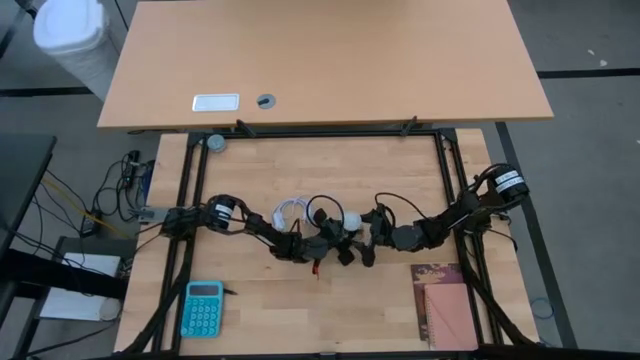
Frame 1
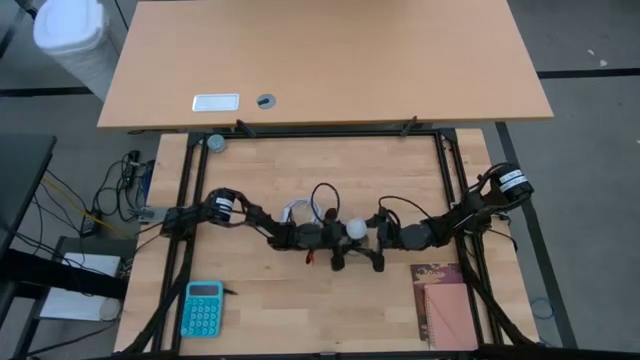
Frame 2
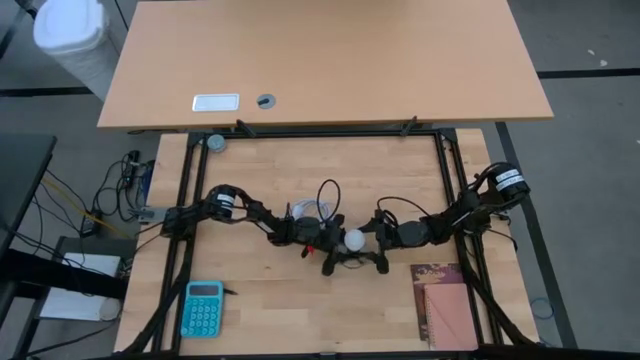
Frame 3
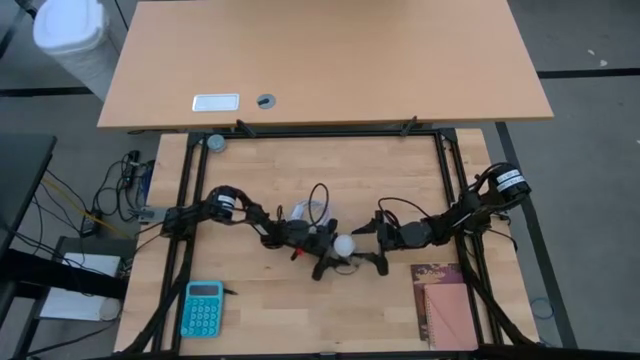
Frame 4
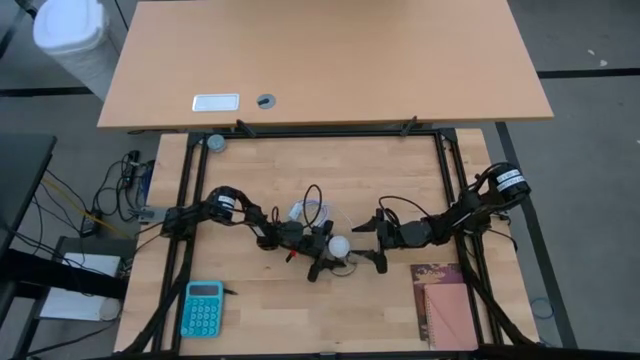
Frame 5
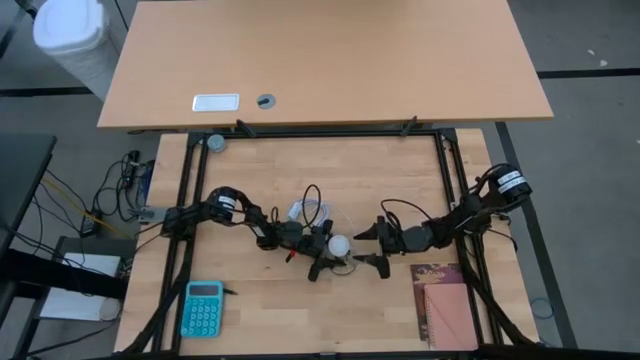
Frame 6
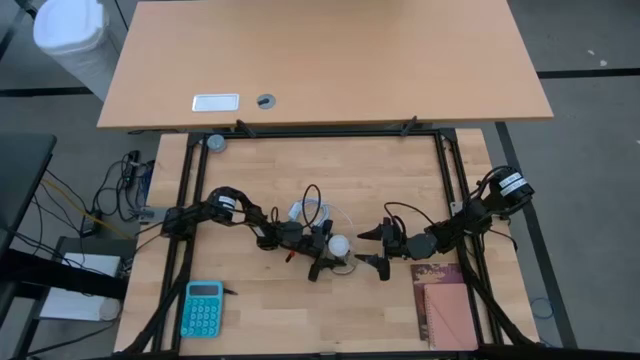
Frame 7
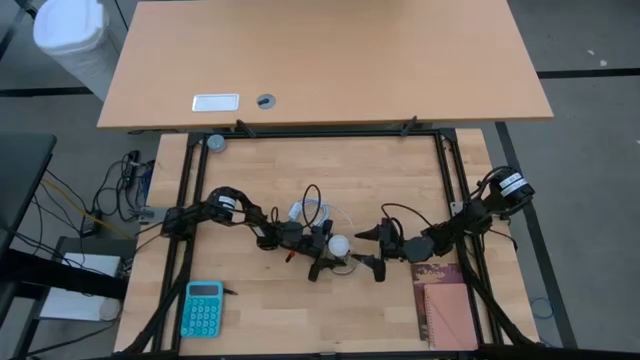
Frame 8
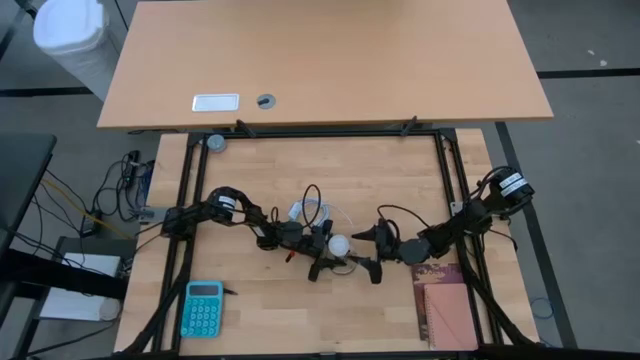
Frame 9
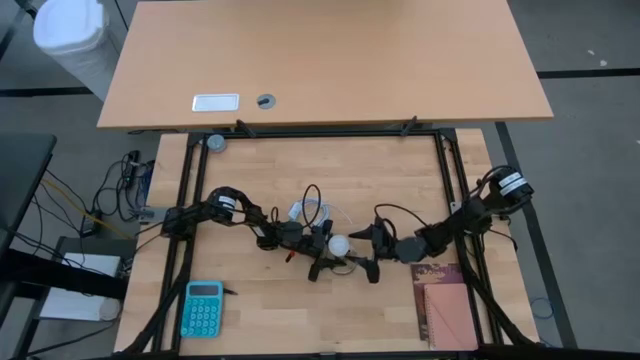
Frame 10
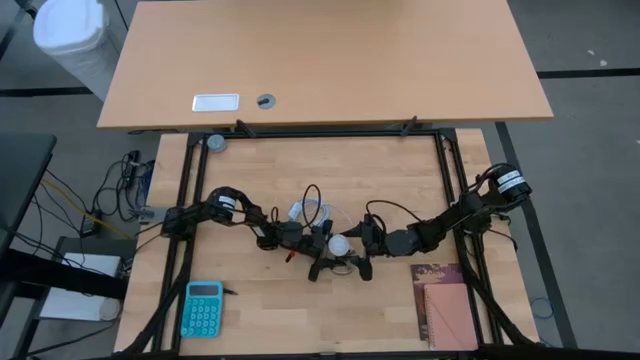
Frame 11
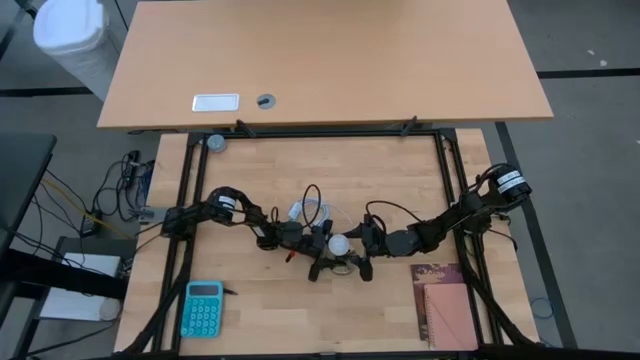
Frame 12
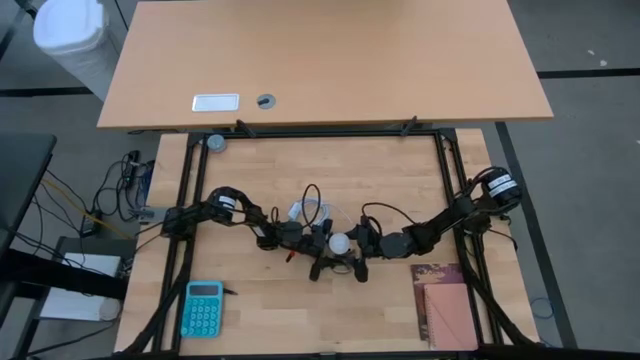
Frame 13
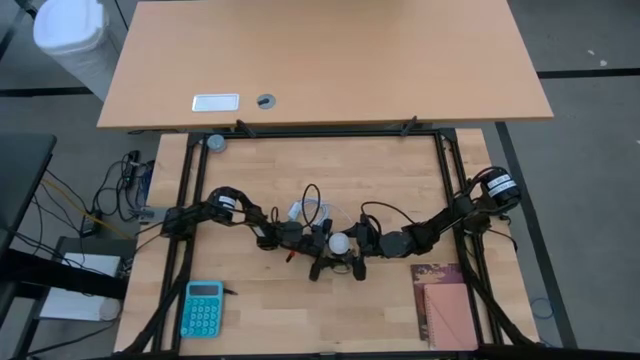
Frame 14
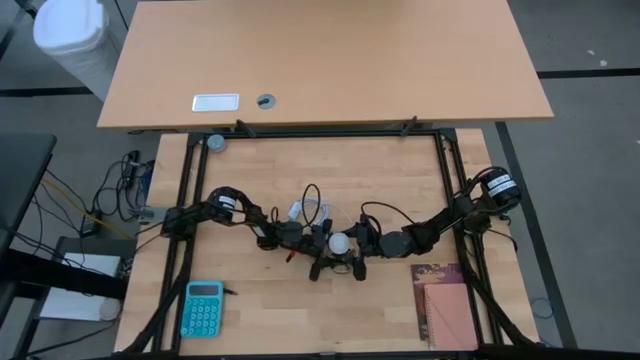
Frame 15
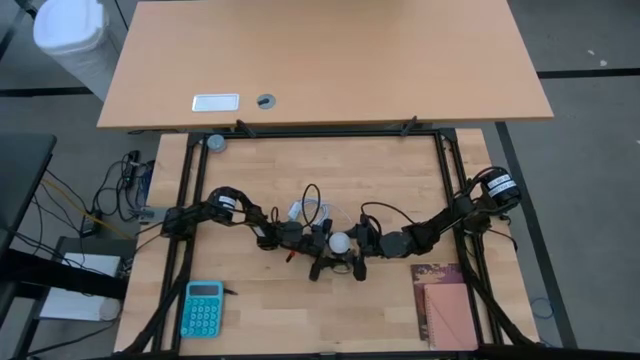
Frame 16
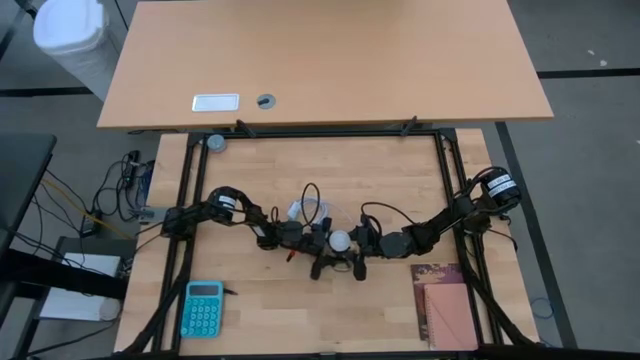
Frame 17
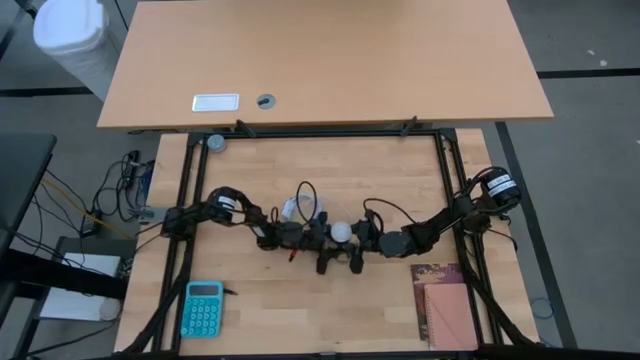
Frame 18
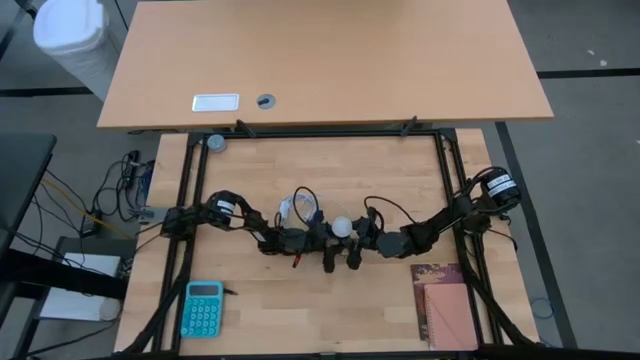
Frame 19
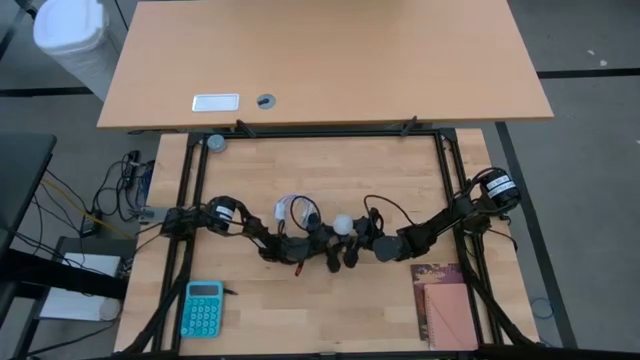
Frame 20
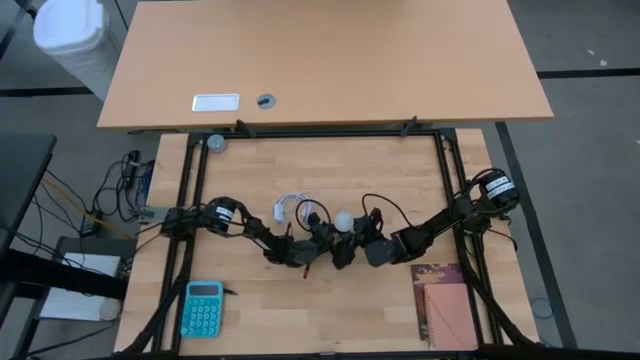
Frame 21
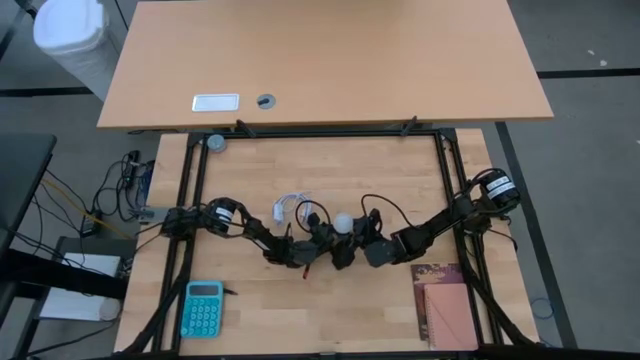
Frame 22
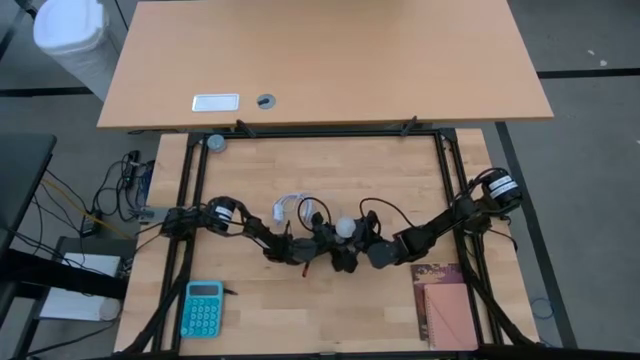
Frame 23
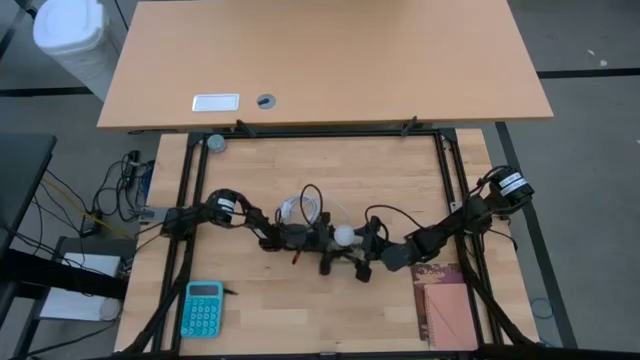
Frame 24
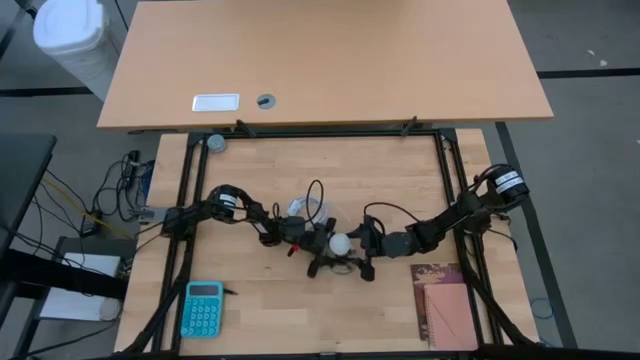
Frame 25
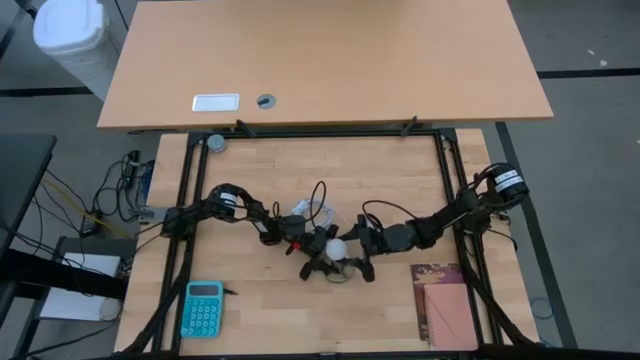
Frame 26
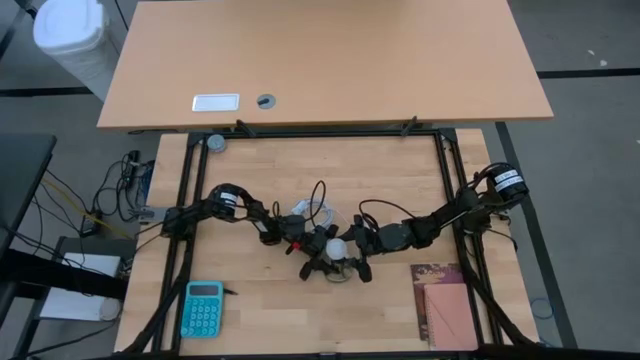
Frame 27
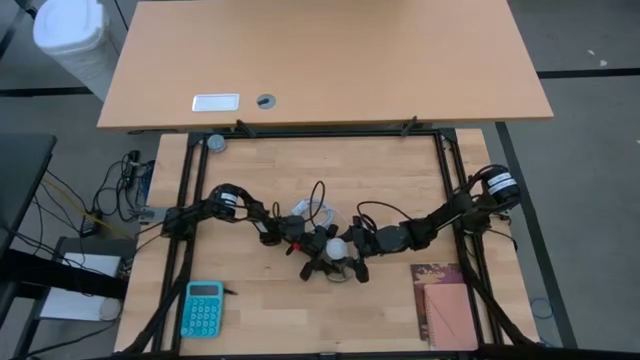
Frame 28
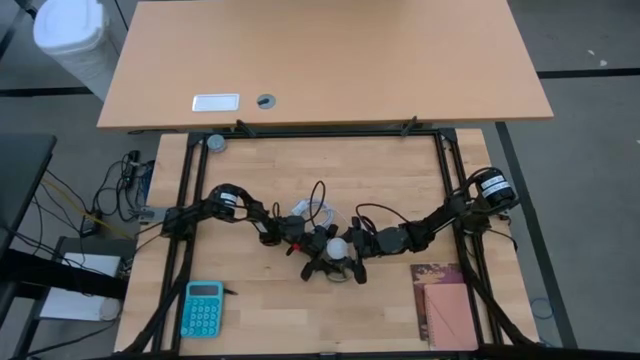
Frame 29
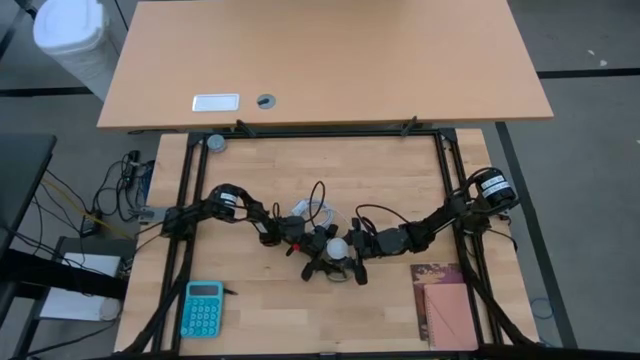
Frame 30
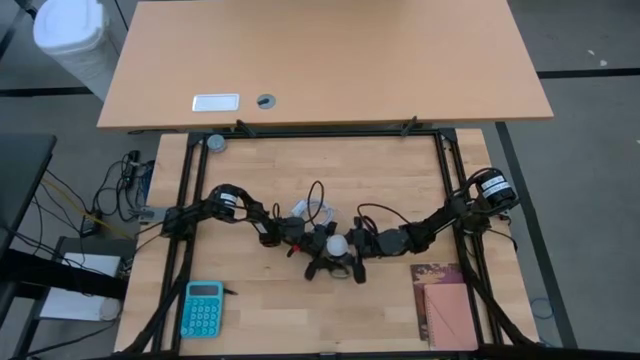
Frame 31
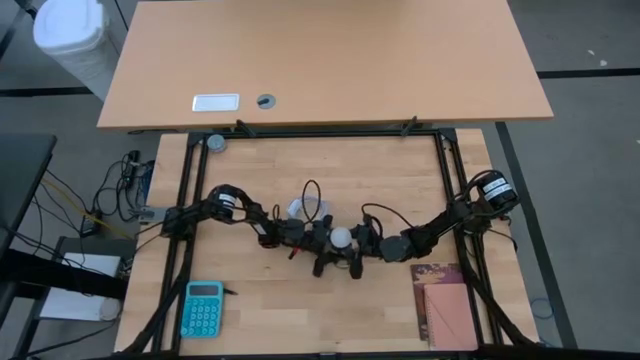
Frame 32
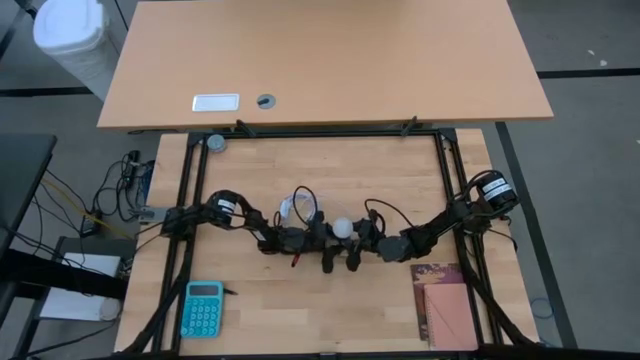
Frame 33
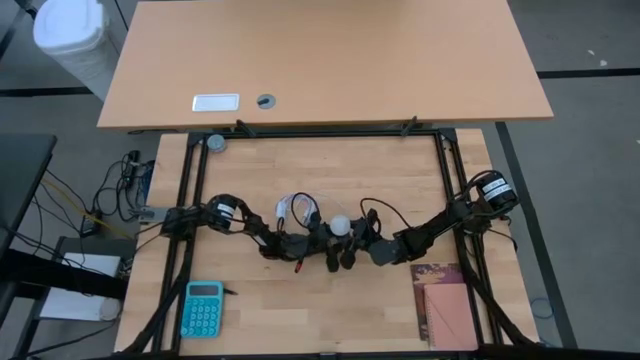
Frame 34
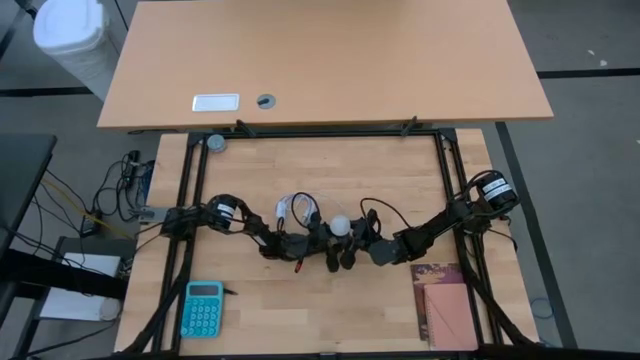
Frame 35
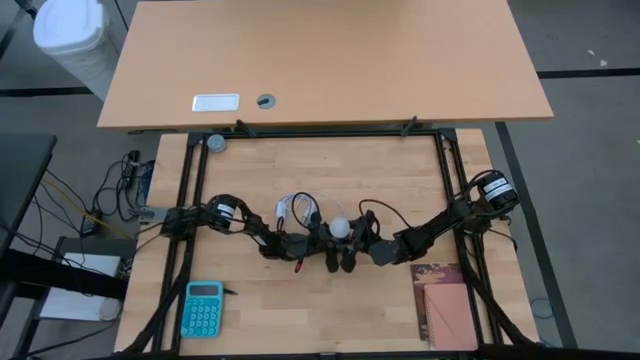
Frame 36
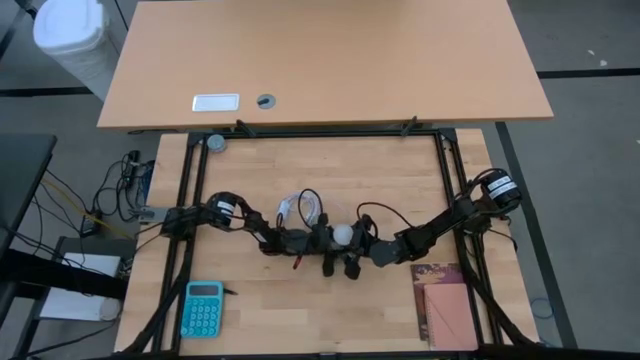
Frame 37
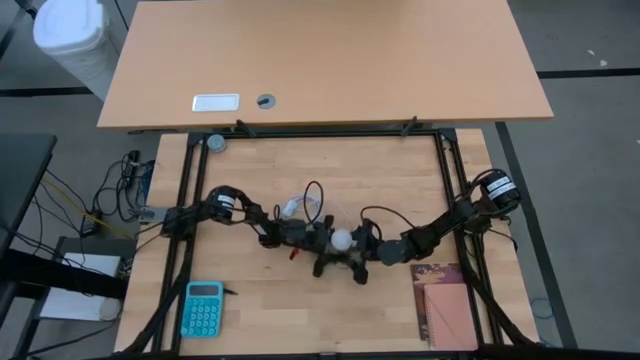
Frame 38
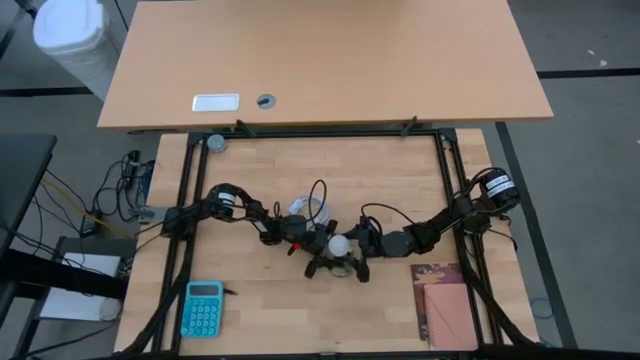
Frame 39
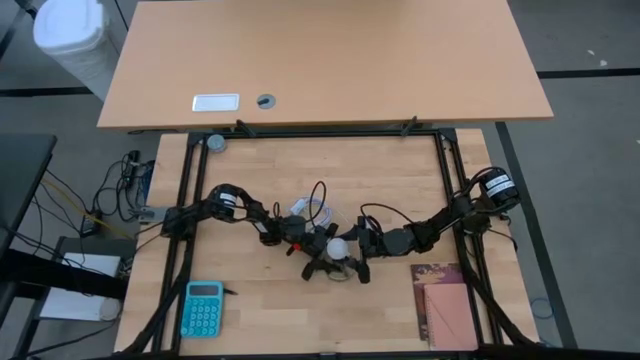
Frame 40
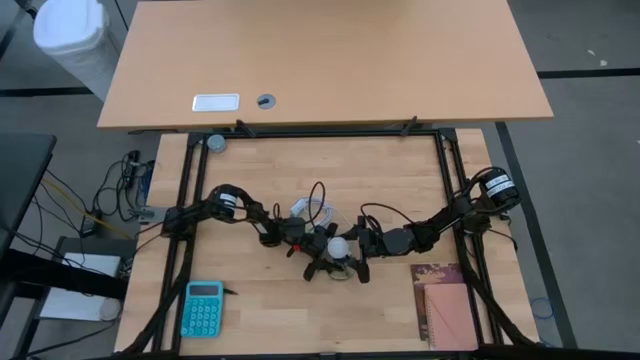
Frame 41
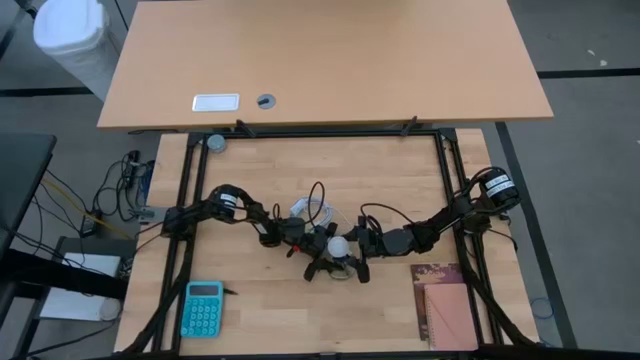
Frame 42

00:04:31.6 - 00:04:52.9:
Task: Screw lightbulb
Insert the white lightbulb into the lamp socket
